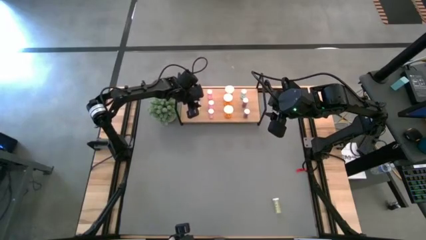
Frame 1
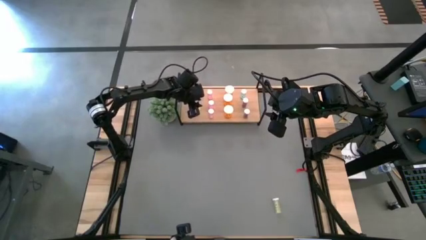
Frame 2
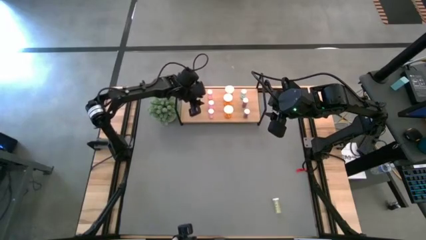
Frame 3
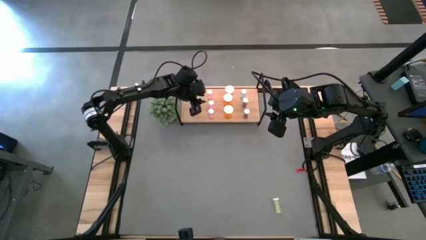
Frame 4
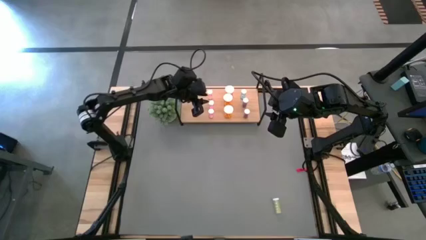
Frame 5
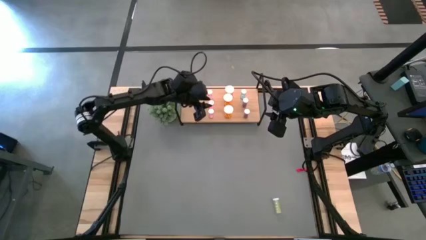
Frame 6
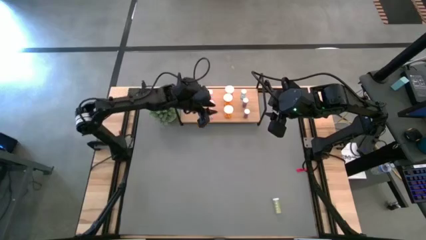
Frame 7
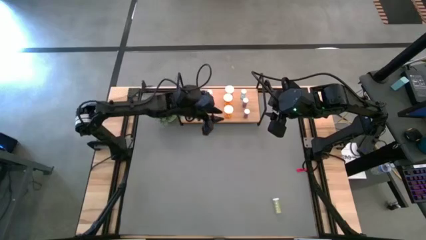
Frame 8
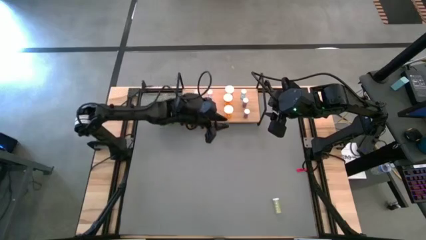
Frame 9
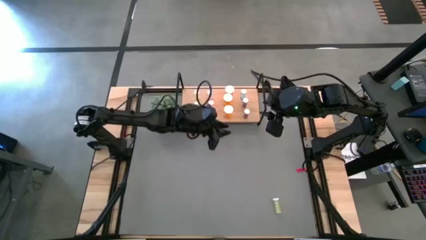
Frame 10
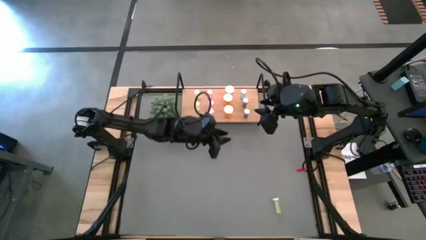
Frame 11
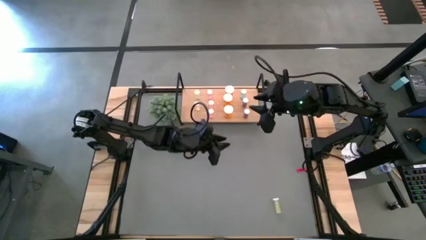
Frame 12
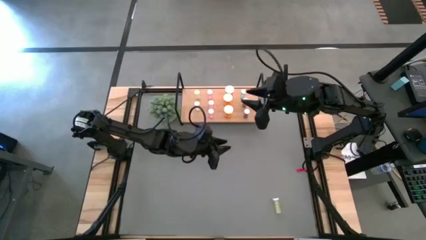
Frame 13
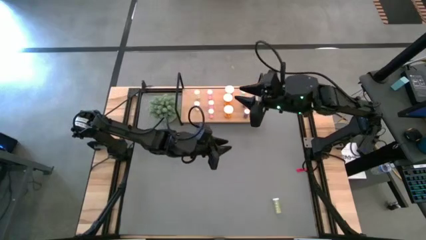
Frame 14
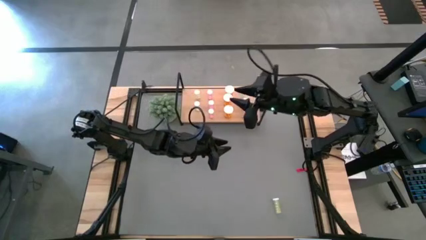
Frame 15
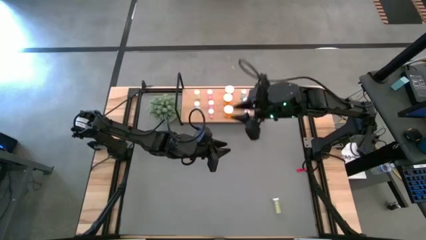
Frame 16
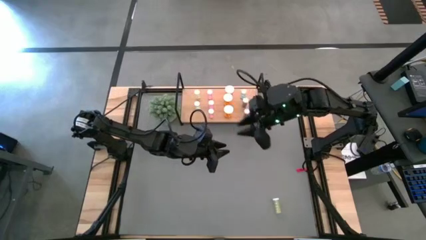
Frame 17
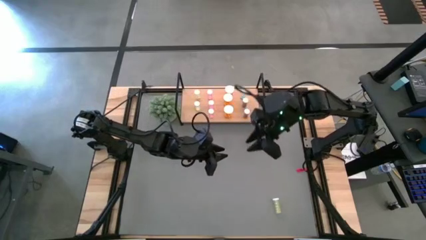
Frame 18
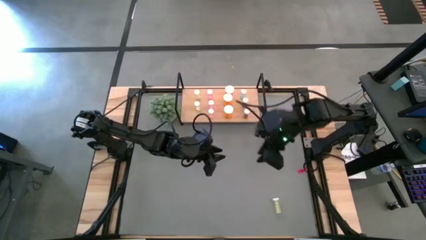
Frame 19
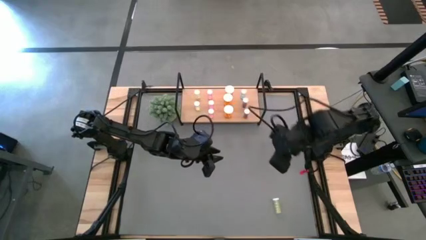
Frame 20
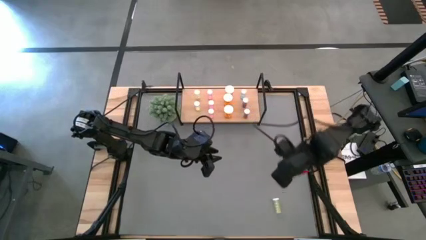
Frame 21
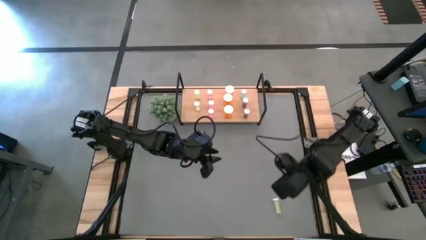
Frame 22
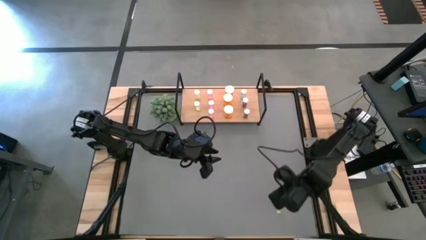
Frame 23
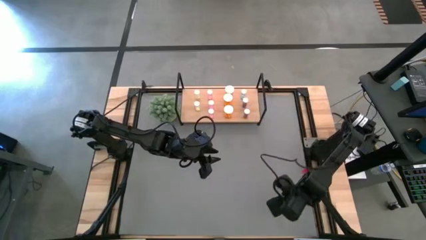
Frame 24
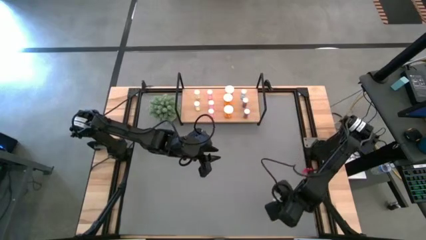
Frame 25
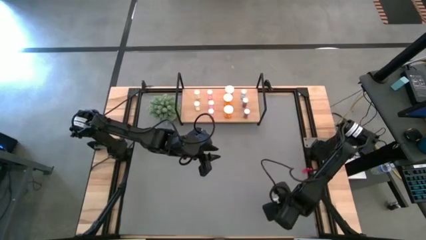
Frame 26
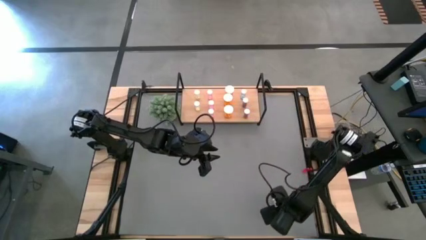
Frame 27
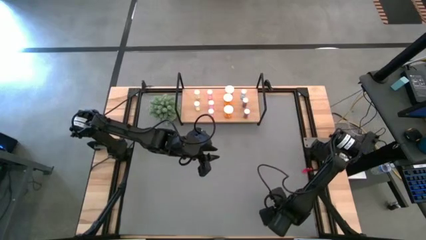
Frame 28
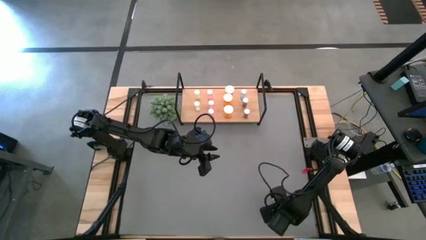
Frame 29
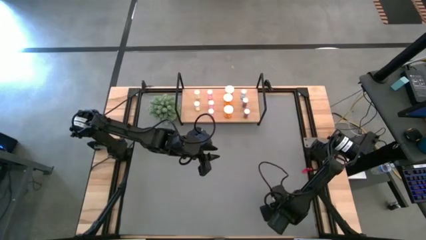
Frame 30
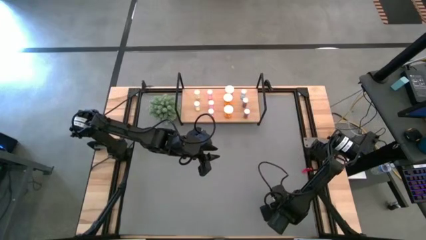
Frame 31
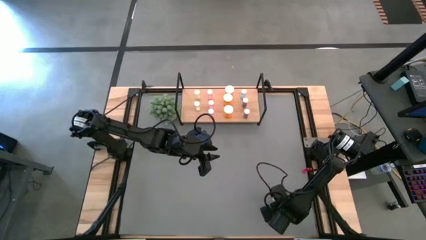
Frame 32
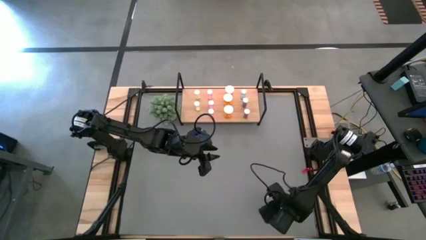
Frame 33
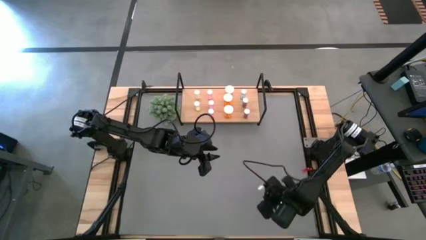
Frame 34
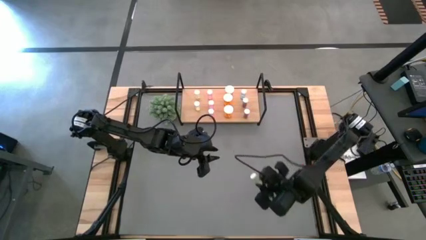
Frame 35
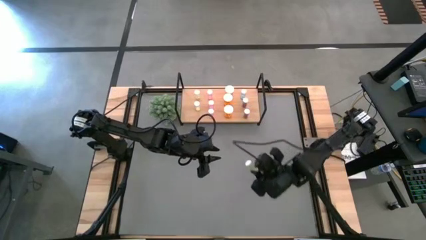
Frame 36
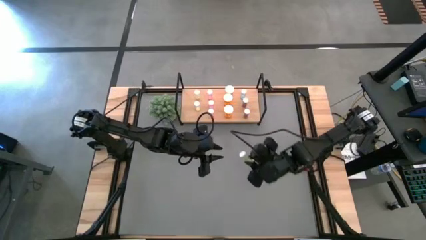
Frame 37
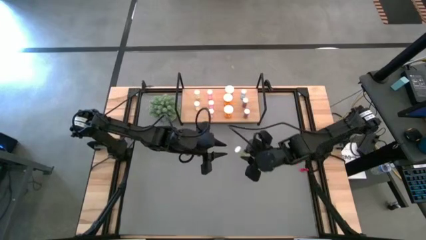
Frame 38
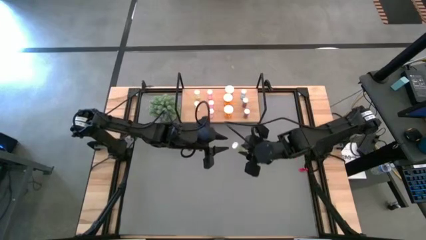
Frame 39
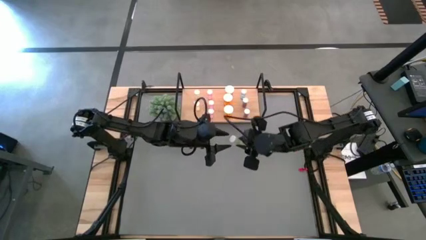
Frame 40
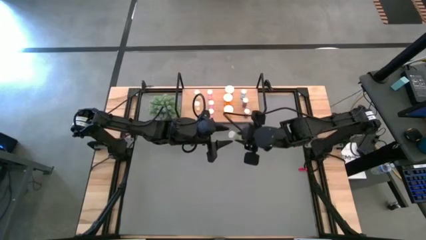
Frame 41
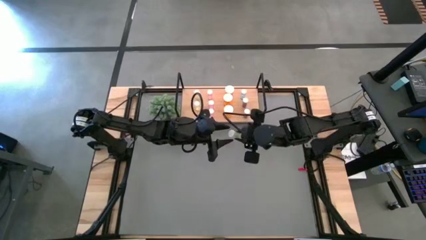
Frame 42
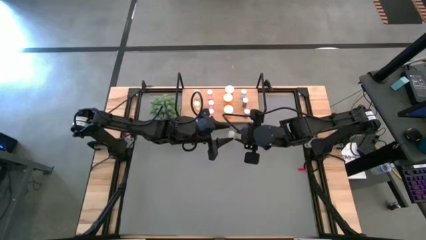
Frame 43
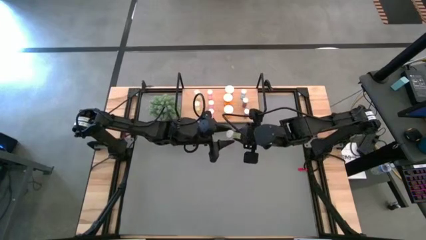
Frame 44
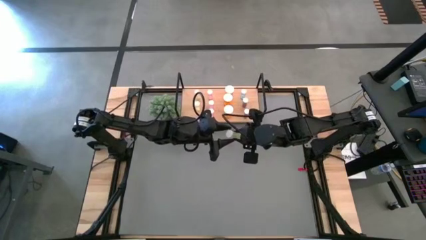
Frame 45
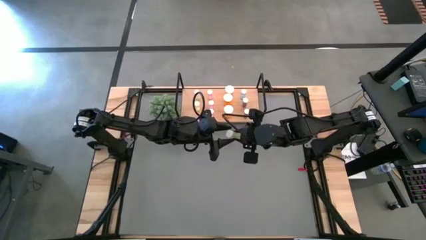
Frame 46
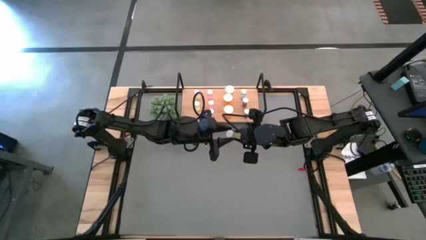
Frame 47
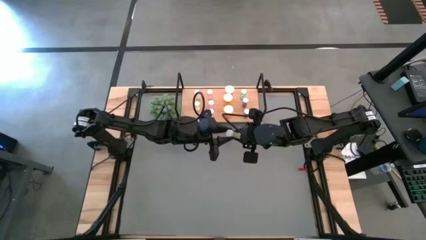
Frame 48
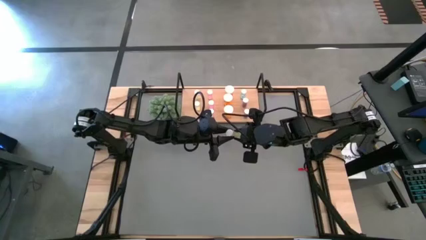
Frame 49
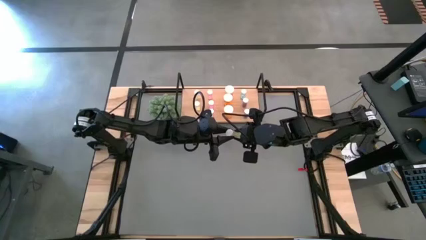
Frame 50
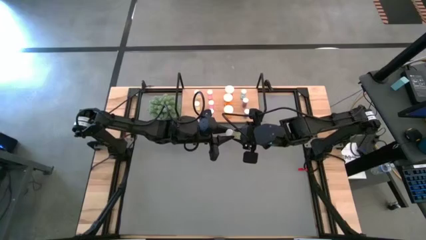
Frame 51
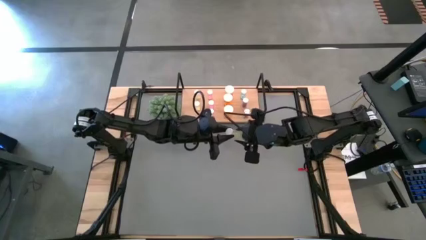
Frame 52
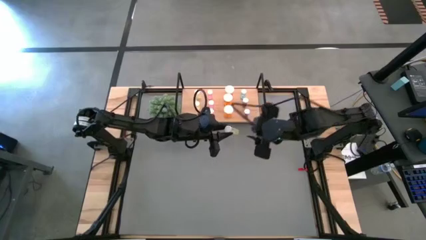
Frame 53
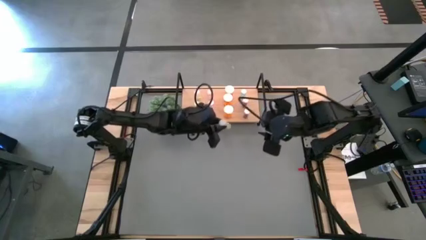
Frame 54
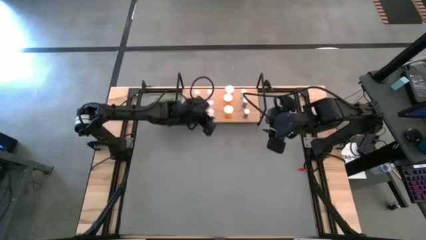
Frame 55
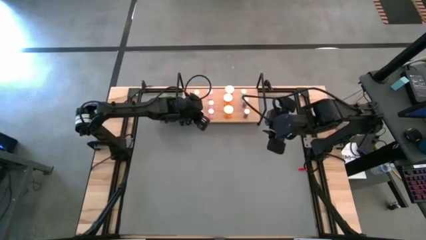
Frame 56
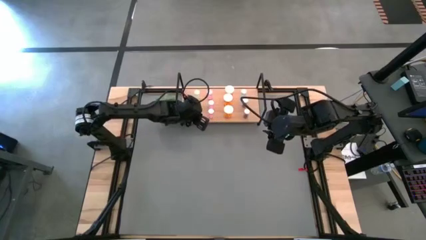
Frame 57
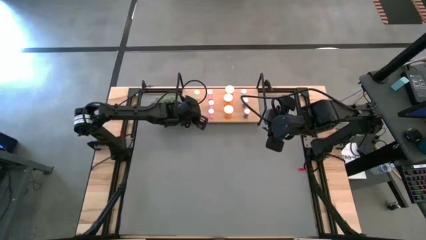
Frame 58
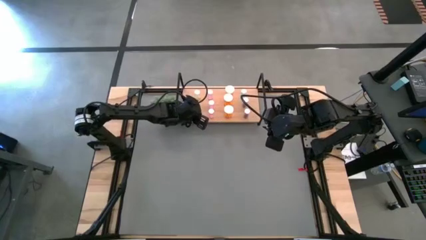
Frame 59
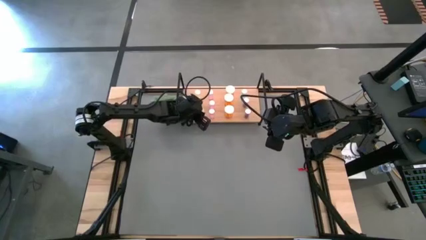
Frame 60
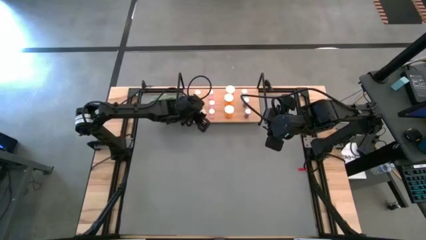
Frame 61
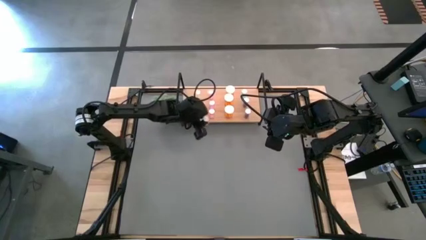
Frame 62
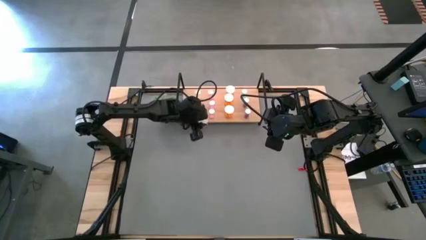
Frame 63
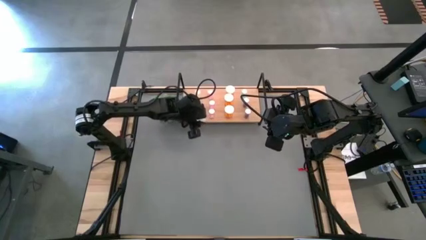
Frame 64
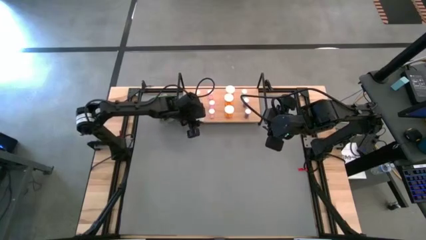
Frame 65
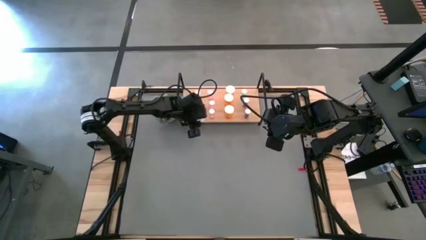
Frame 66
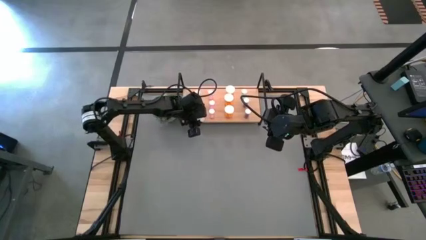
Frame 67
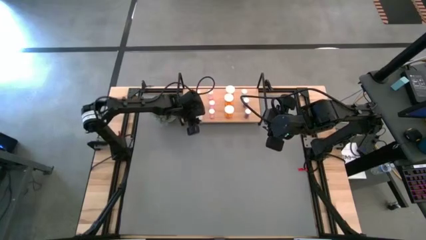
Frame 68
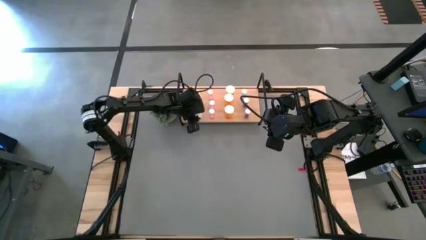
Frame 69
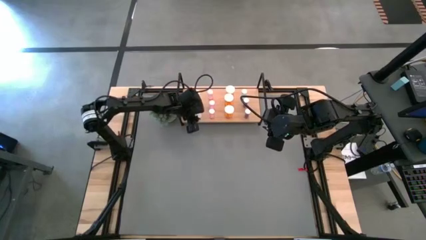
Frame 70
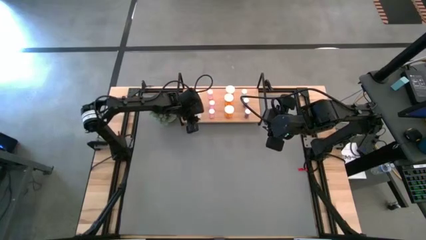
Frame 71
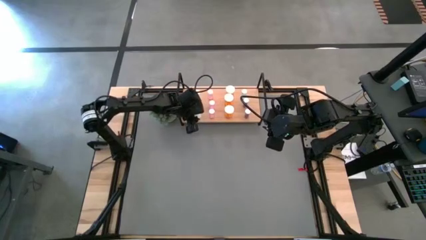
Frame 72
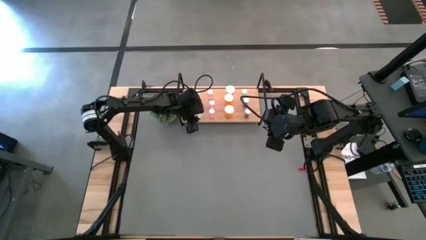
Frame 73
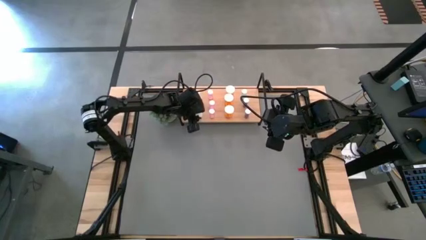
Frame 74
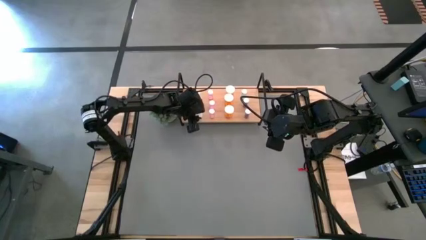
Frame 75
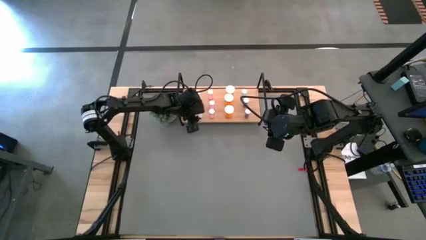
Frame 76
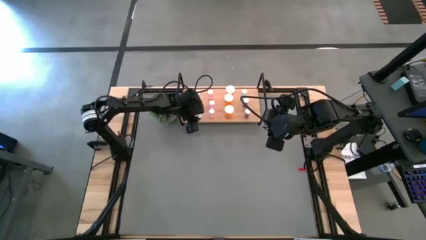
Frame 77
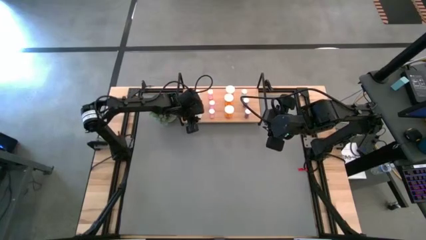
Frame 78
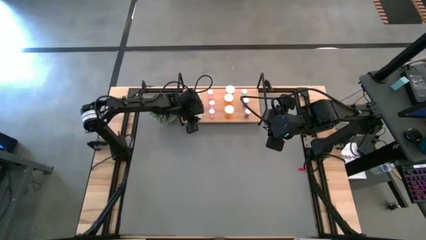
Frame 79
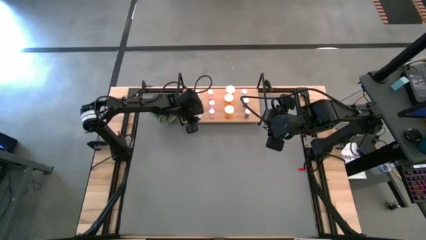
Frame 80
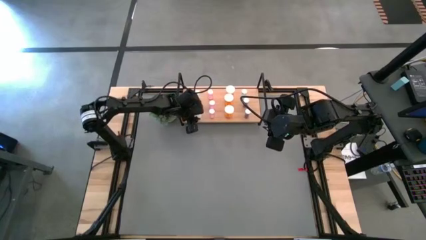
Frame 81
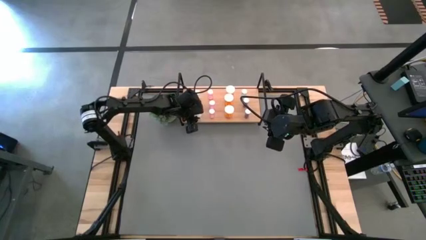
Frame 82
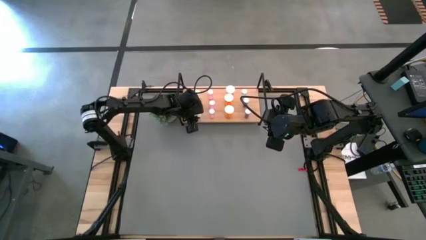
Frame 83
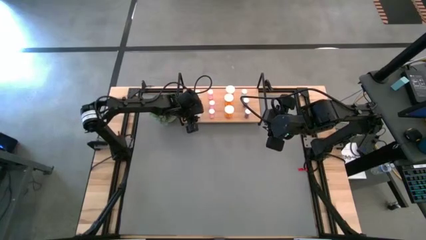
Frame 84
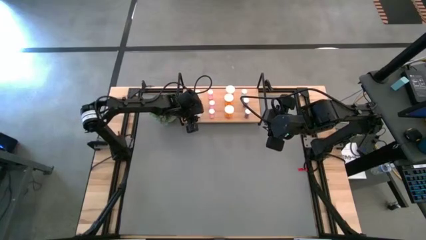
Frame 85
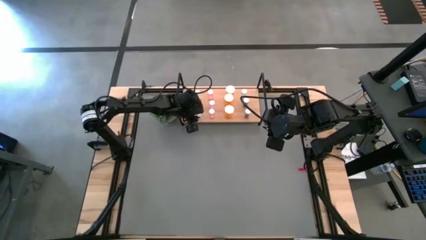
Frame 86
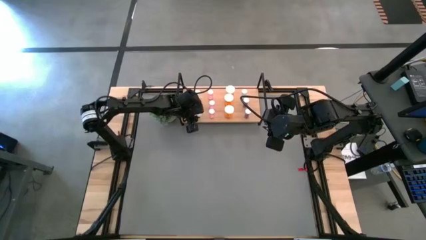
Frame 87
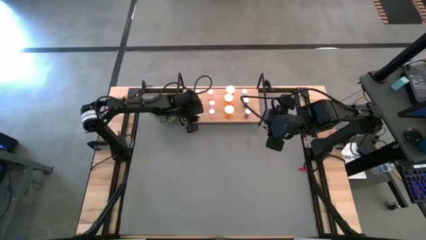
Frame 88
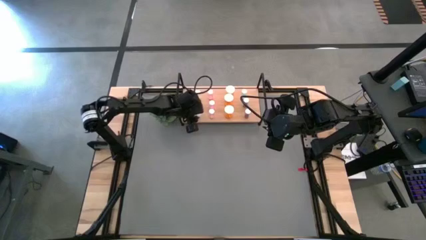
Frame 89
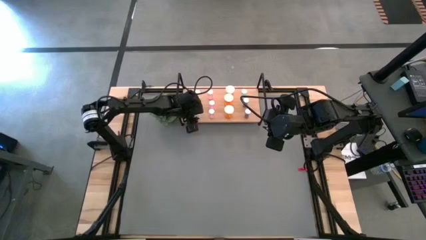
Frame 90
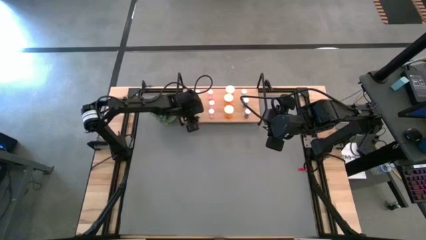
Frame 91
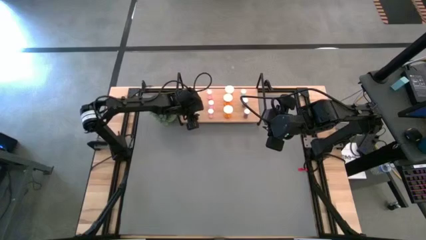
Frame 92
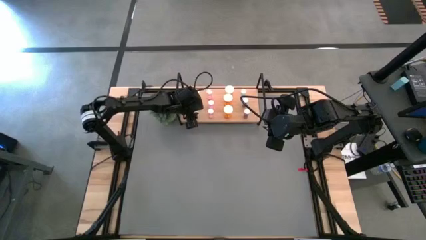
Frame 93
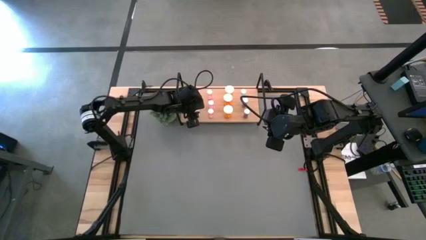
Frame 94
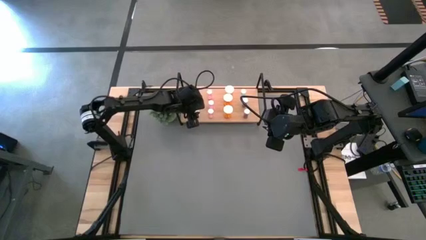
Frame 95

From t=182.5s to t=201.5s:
Task: Pick and place medicine bottles onto shelf by color
Put the yellow pill bottle on the shelf aligned with the other yellow pill bottles
